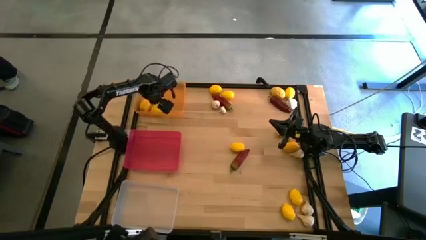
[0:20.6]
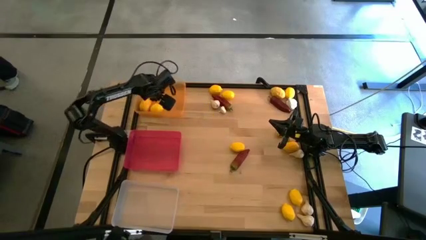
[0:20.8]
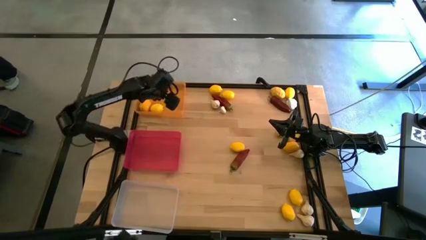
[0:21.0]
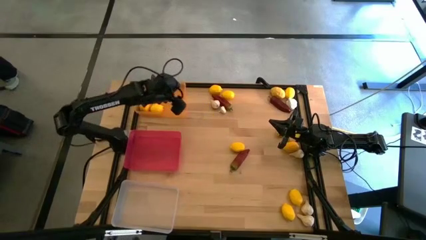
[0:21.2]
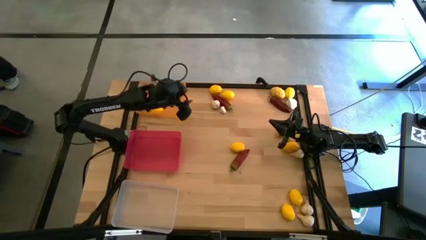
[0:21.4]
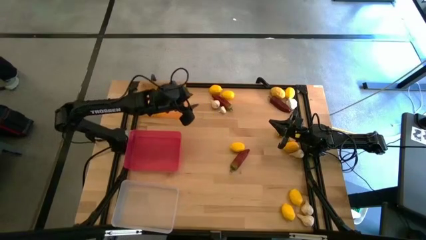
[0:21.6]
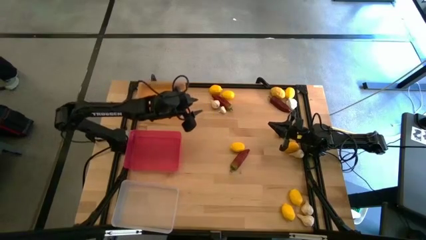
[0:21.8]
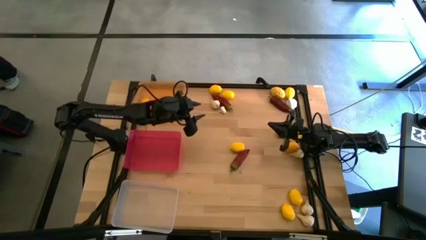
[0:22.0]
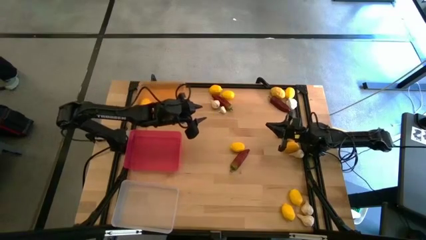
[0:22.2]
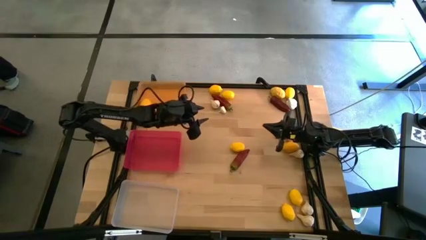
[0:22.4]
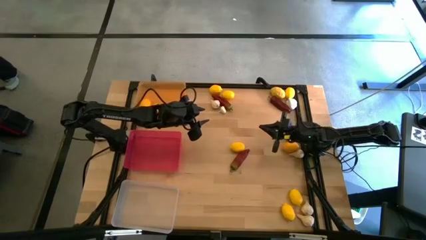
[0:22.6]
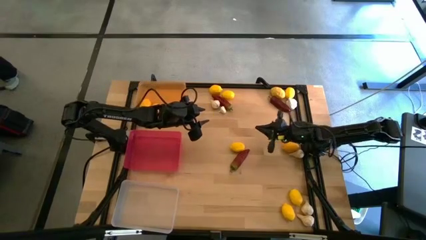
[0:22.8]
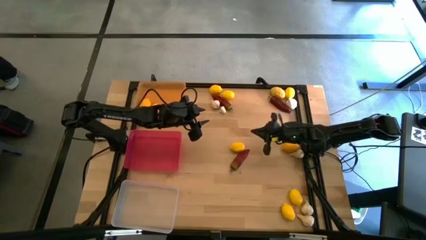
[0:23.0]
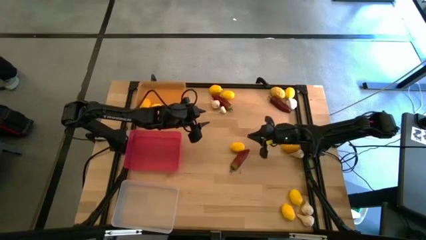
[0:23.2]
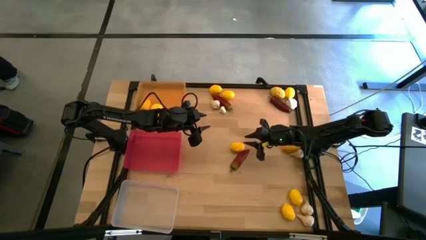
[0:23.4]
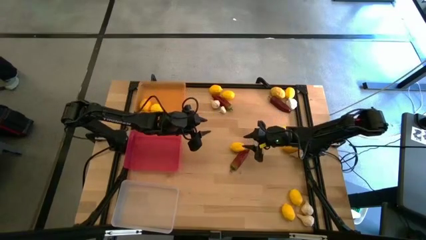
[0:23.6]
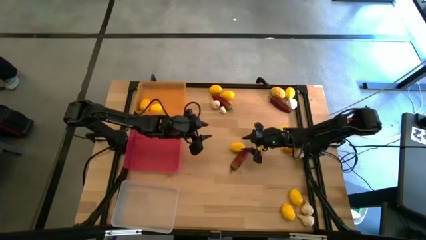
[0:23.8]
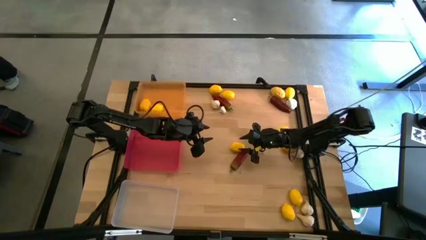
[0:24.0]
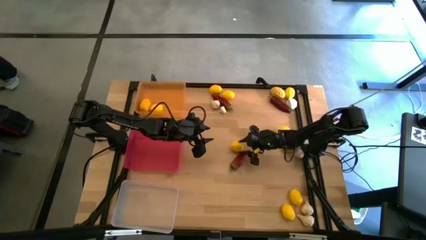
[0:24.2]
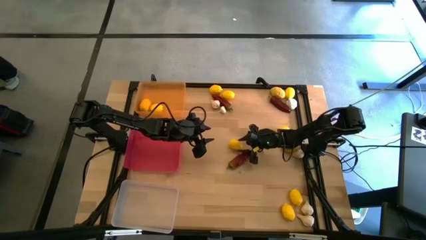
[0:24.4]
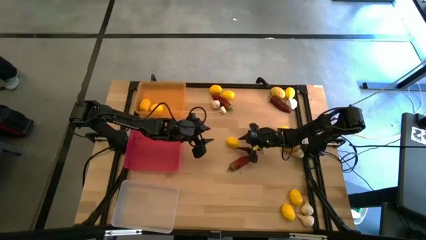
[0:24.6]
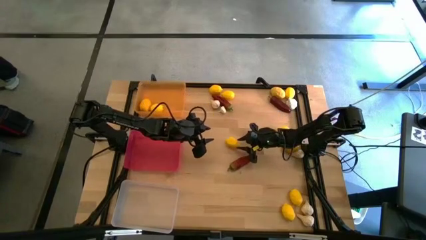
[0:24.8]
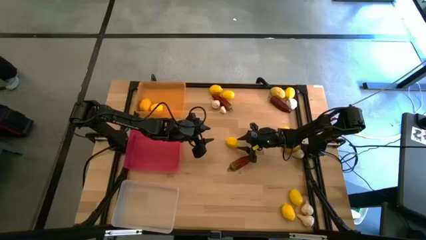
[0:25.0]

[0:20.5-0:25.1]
Task: Sort produce into baskets
Put the lemon into the yellow bin

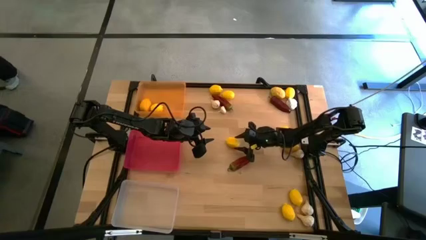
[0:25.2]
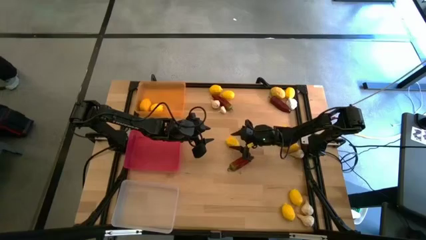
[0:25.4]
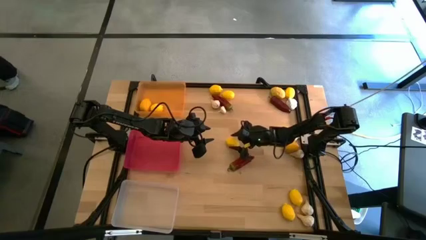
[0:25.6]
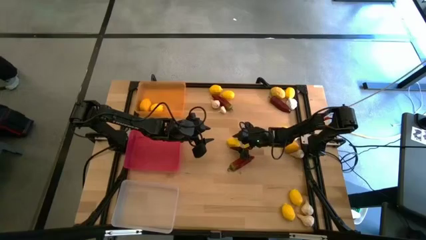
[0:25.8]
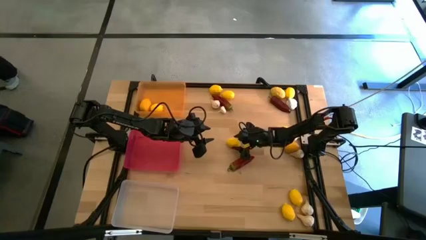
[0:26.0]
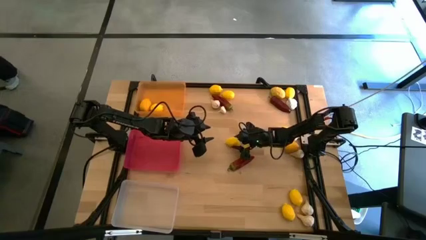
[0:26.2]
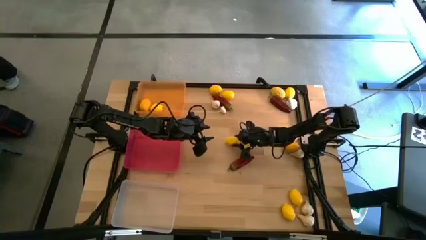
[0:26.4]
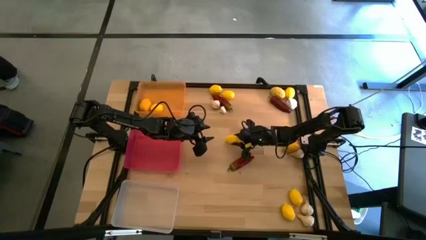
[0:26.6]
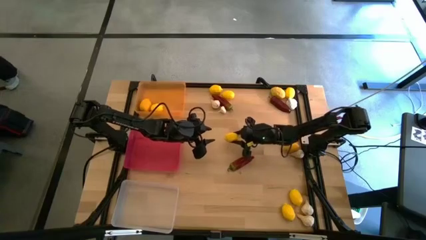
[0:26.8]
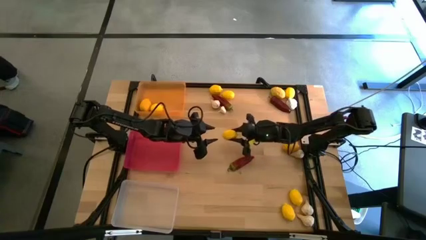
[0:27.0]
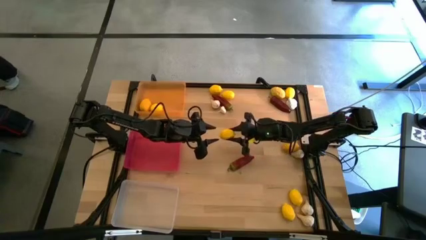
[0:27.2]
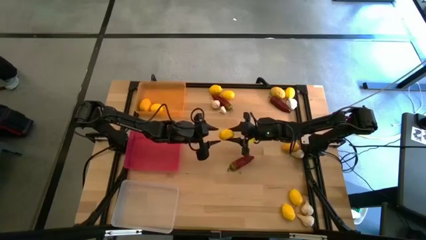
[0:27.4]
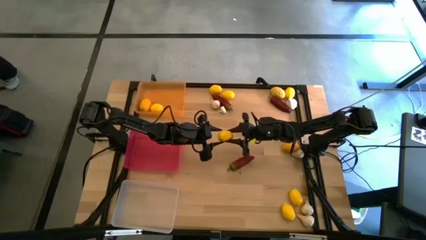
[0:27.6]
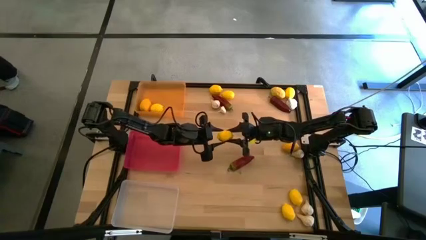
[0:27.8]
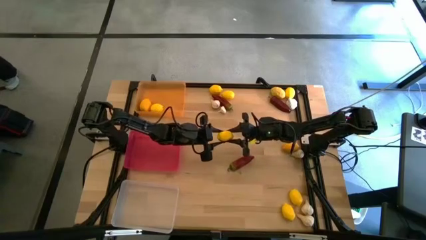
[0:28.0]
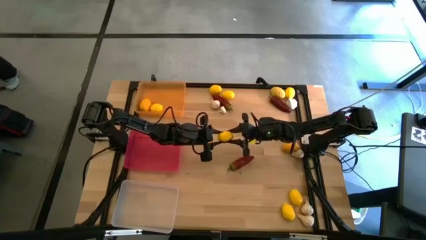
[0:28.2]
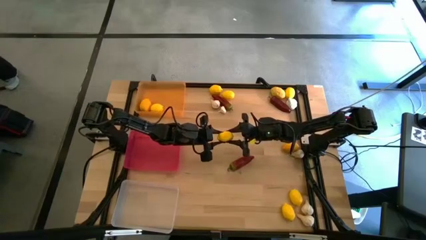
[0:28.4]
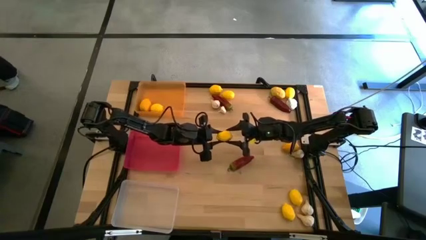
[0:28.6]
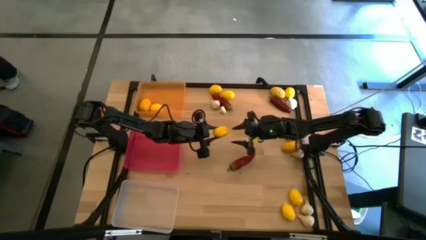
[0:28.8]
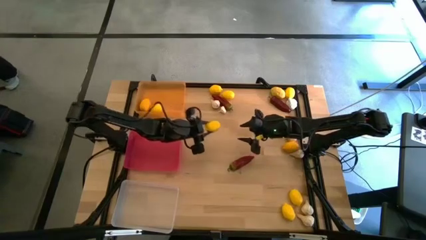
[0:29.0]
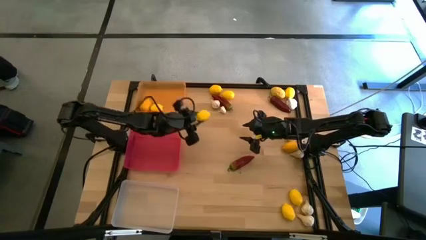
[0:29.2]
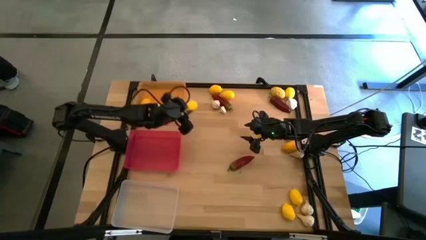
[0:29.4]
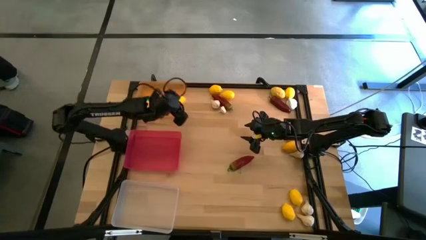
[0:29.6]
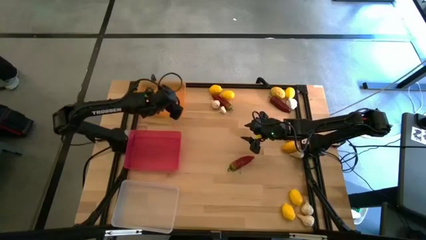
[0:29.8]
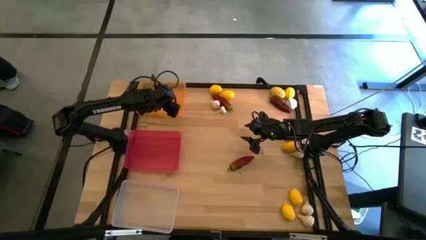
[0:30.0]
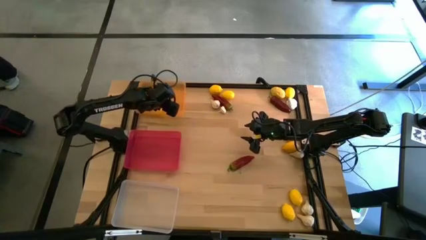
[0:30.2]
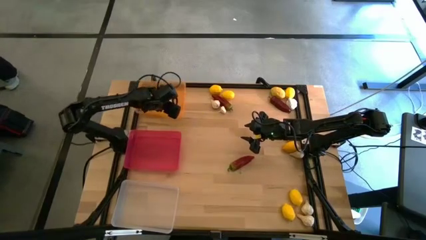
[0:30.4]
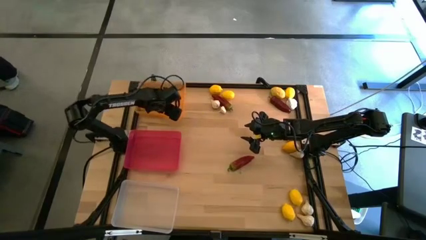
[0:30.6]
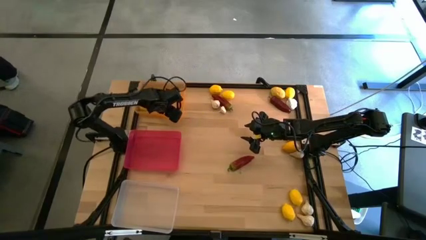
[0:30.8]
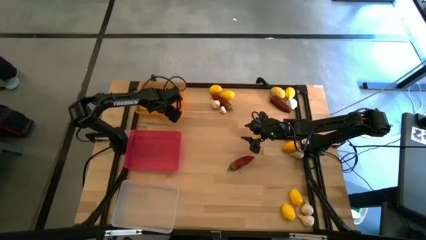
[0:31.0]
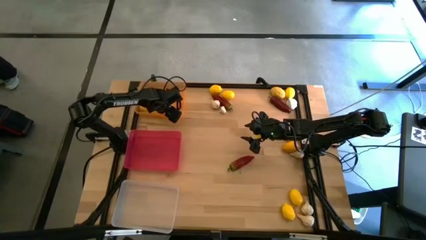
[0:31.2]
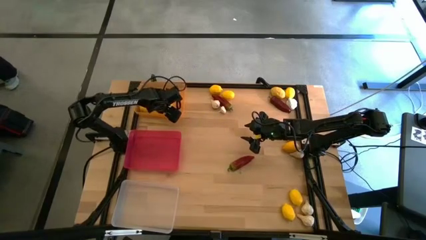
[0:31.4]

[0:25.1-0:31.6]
Put the lemon into the yellow bin

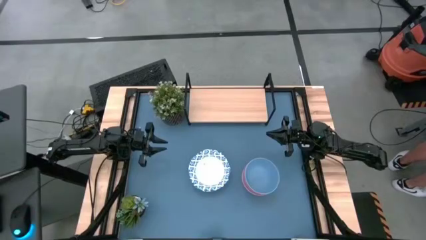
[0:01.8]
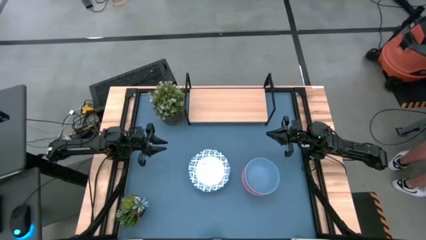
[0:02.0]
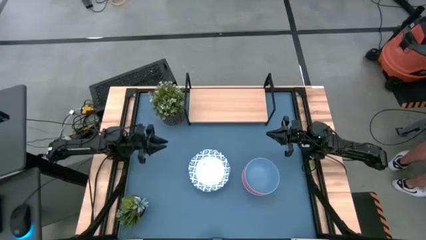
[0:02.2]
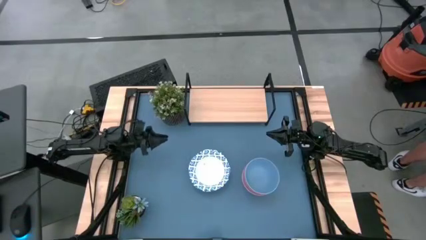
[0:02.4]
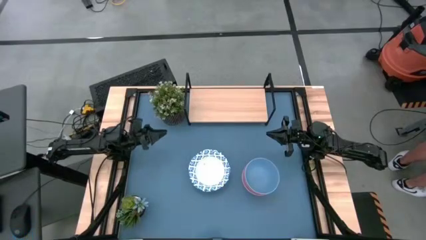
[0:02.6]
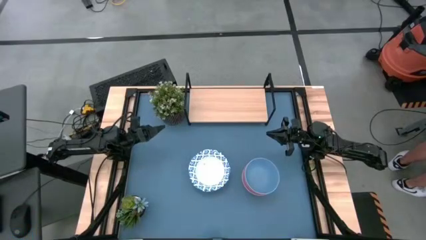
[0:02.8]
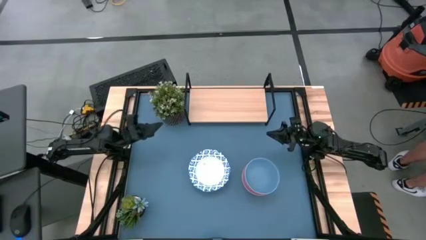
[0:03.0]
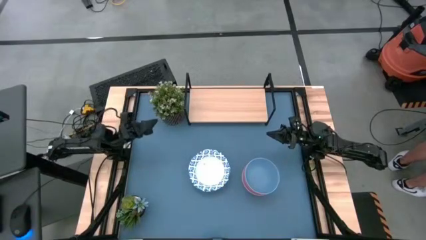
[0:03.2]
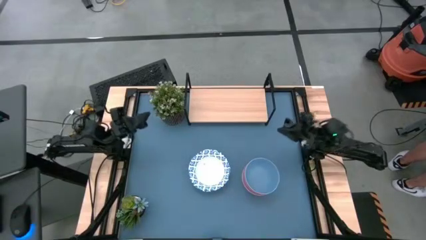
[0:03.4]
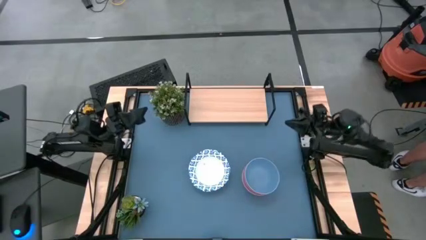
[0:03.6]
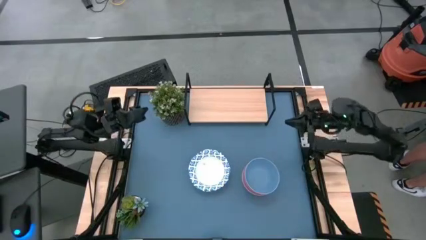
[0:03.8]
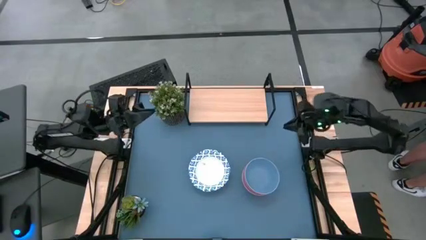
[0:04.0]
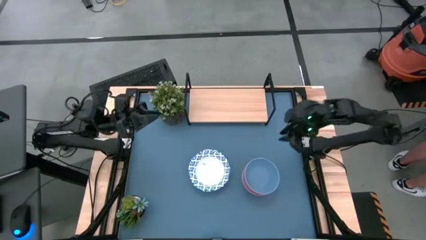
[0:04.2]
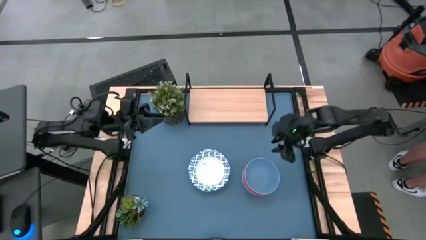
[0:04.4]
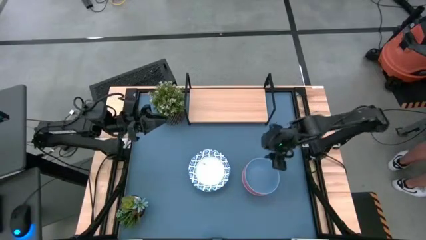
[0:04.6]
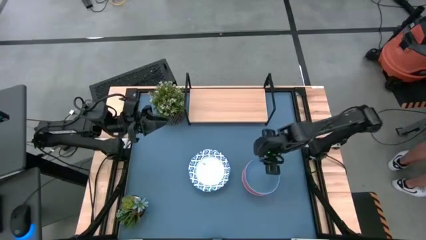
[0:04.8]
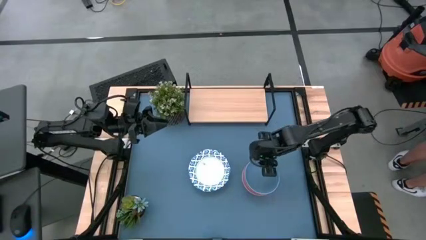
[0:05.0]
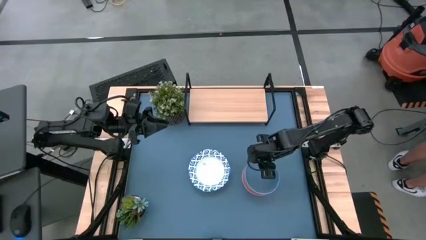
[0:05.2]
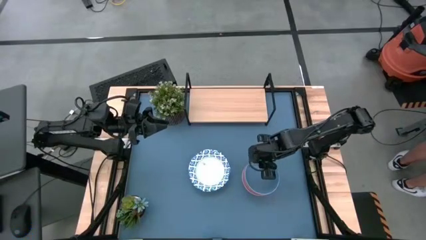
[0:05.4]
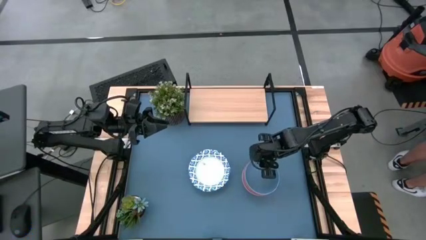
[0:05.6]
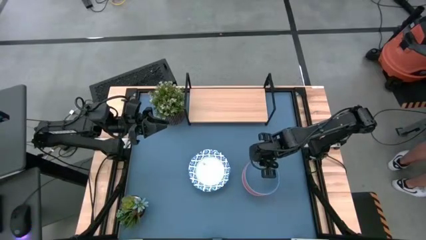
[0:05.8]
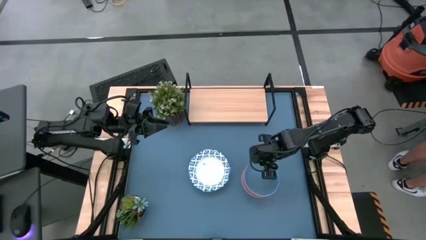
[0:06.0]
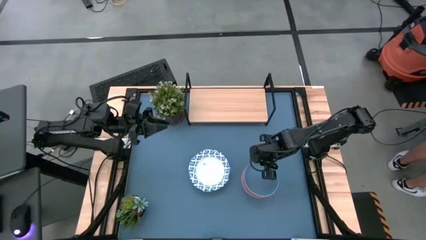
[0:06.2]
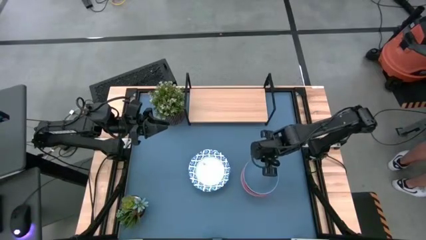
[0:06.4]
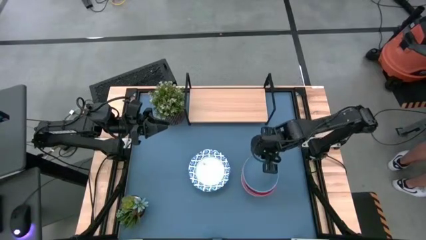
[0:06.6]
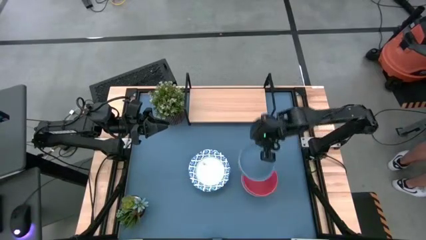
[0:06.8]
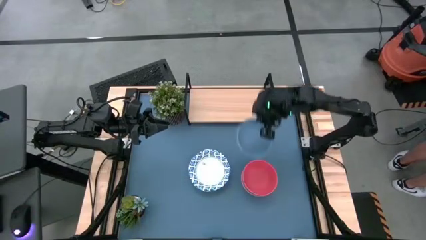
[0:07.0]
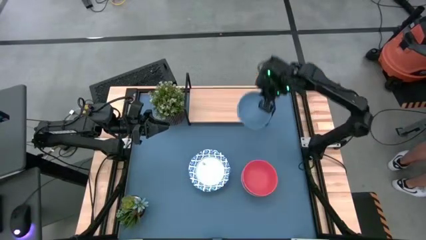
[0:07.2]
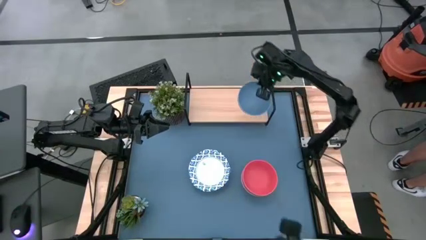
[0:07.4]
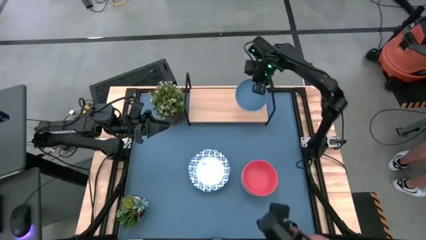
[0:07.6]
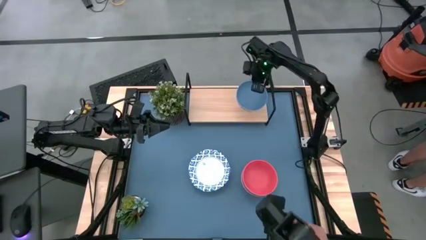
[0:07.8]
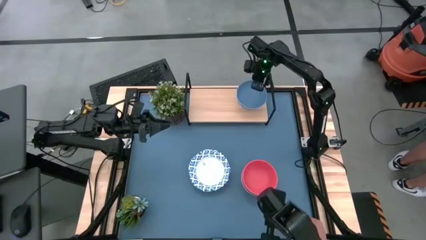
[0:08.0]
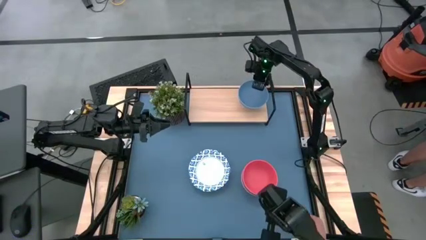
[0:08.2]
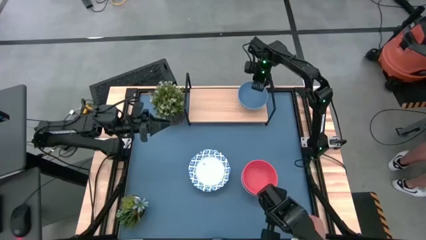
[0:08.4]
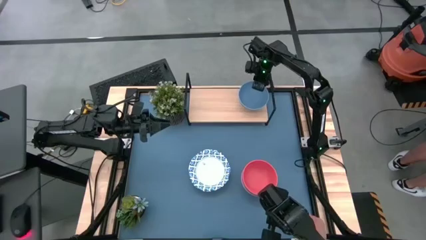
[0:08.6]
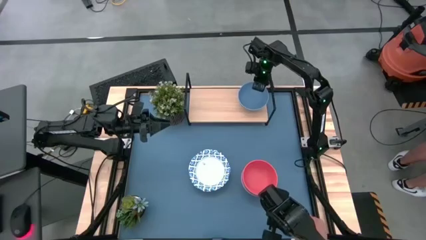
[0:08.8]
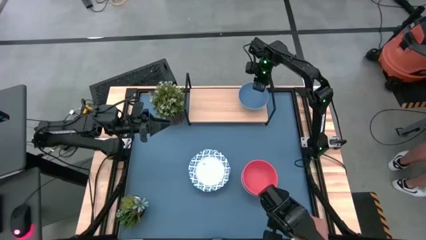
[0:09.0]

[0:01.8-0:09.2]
Task: Place and stack bowls onto a shelf
Put the blue bowl on the shelf
